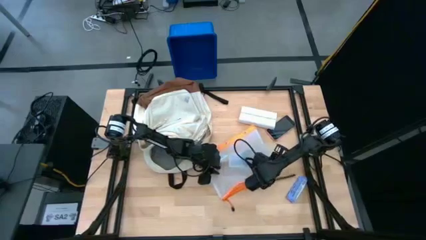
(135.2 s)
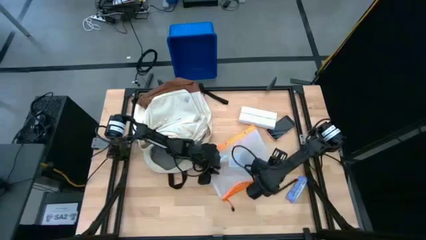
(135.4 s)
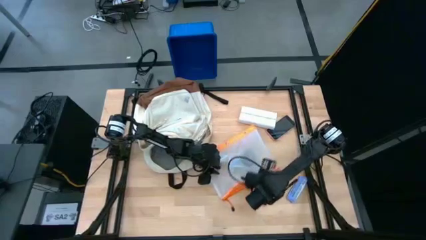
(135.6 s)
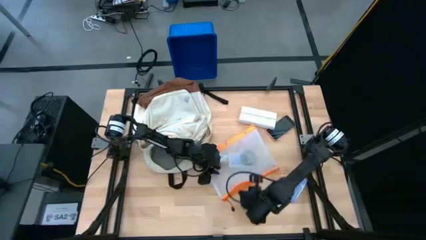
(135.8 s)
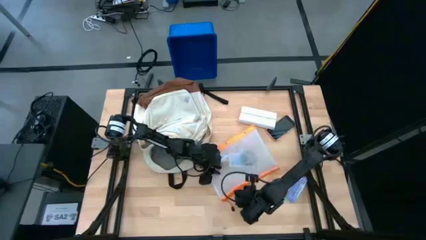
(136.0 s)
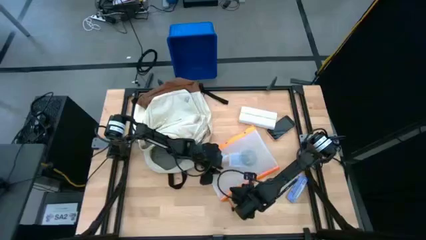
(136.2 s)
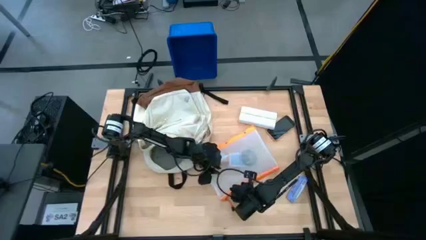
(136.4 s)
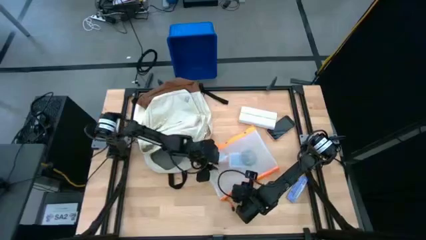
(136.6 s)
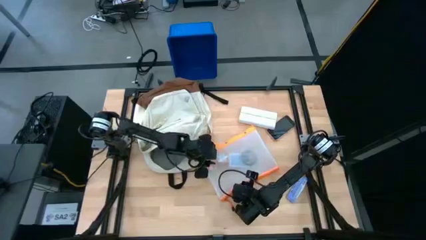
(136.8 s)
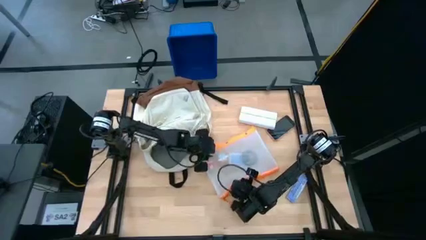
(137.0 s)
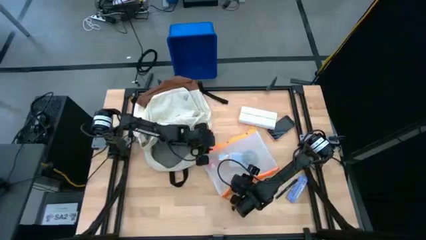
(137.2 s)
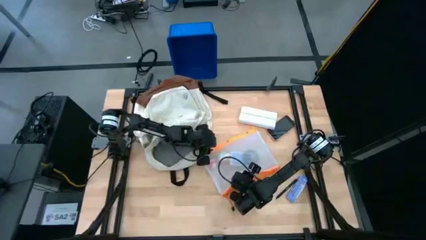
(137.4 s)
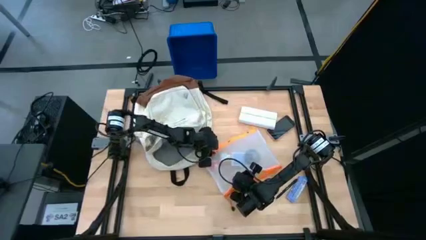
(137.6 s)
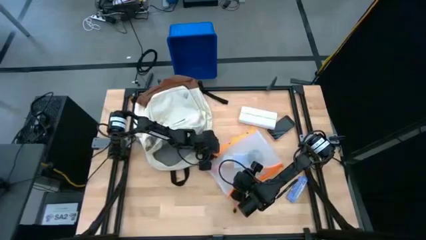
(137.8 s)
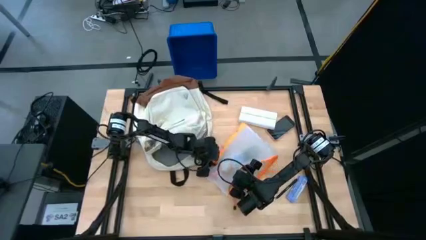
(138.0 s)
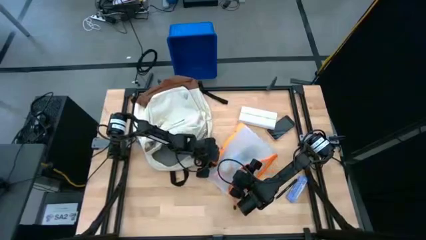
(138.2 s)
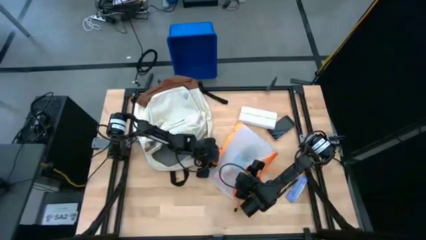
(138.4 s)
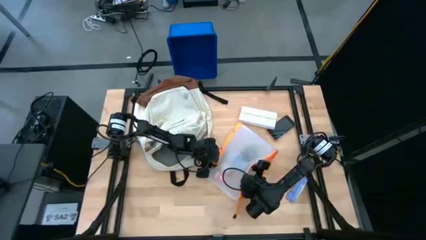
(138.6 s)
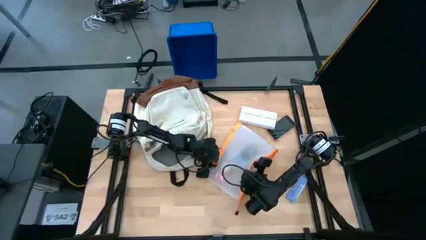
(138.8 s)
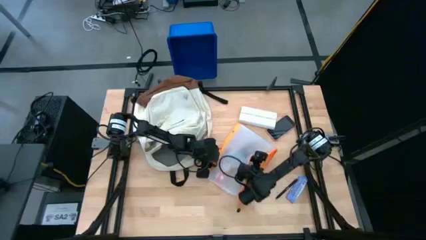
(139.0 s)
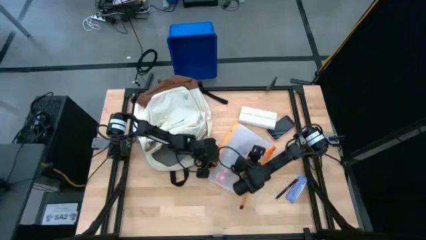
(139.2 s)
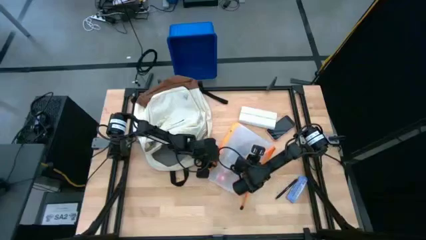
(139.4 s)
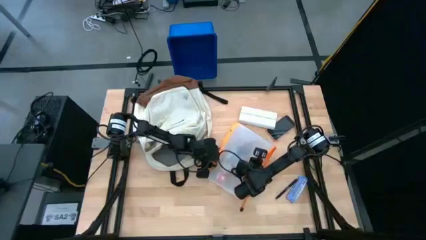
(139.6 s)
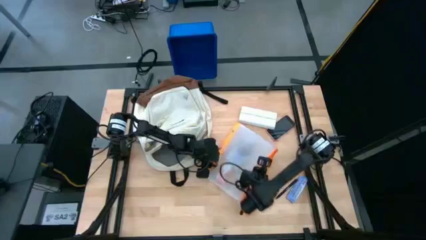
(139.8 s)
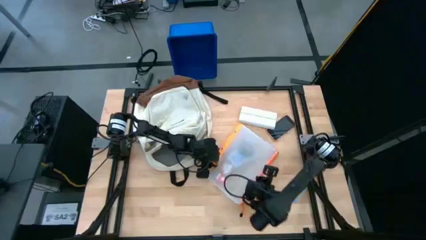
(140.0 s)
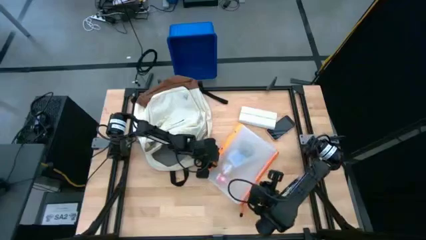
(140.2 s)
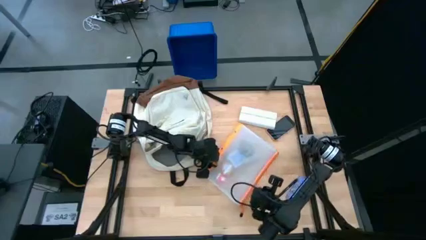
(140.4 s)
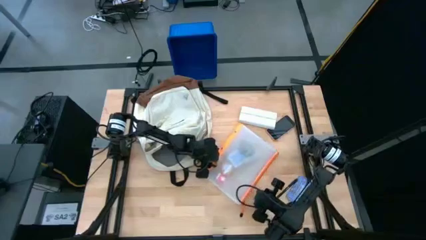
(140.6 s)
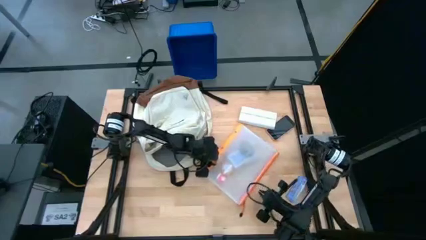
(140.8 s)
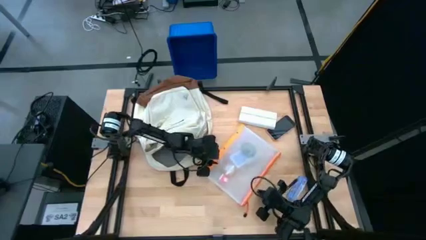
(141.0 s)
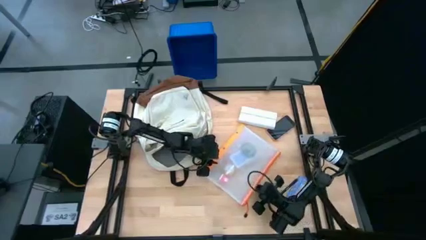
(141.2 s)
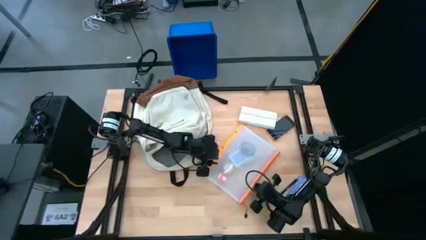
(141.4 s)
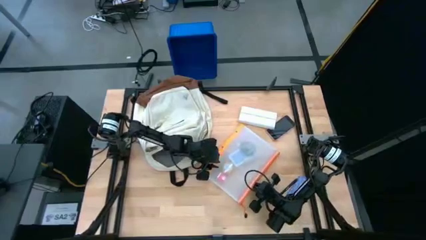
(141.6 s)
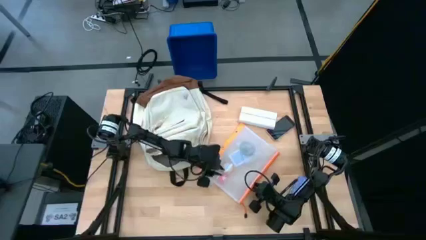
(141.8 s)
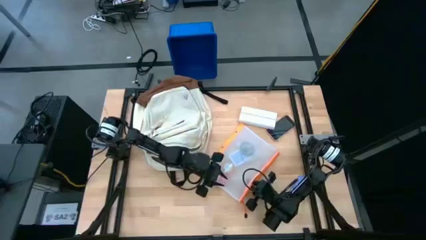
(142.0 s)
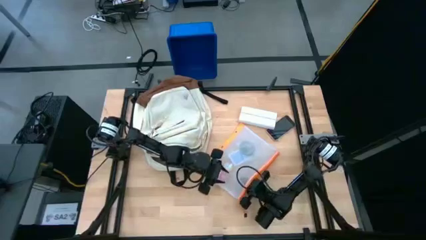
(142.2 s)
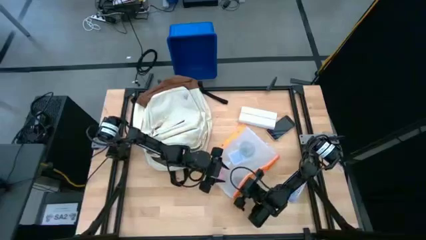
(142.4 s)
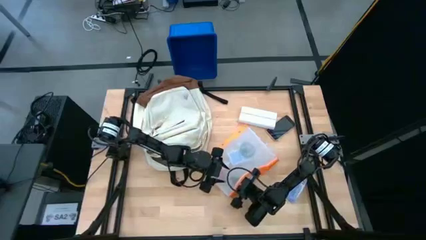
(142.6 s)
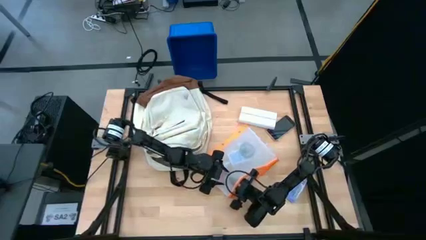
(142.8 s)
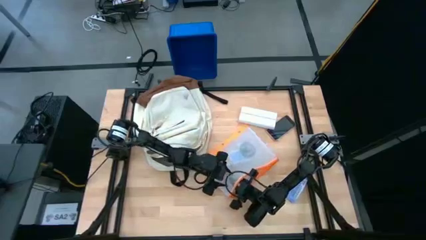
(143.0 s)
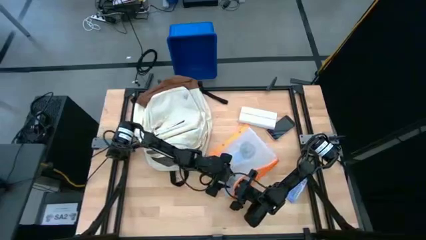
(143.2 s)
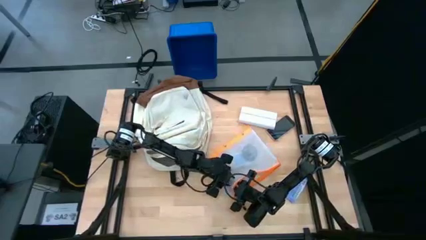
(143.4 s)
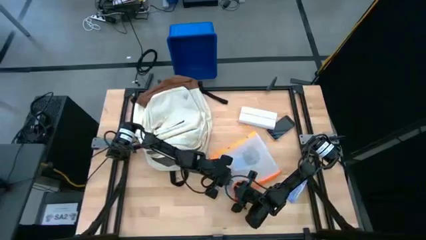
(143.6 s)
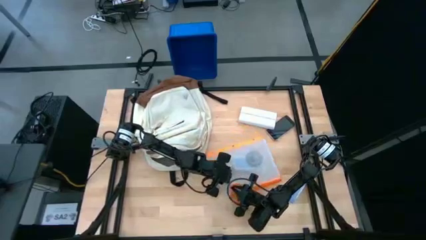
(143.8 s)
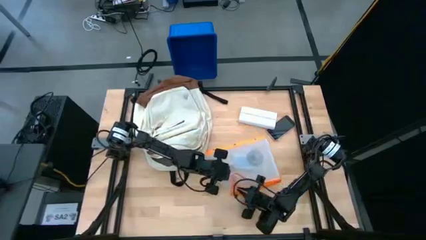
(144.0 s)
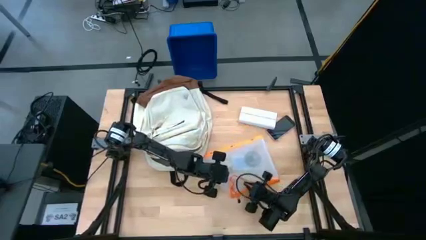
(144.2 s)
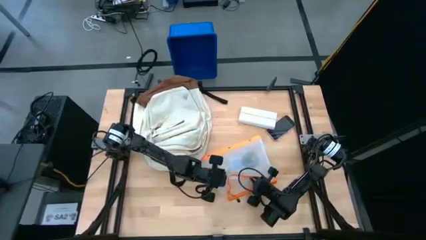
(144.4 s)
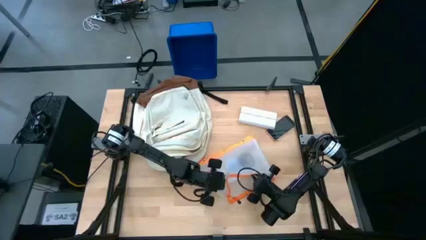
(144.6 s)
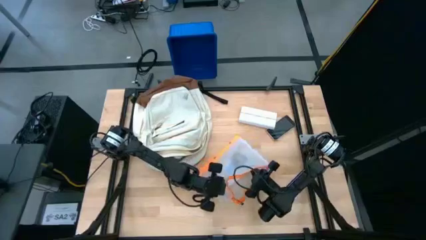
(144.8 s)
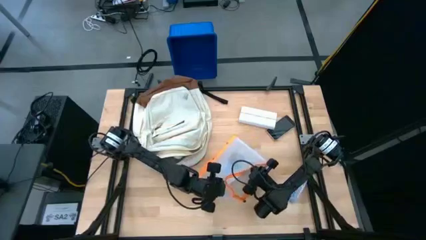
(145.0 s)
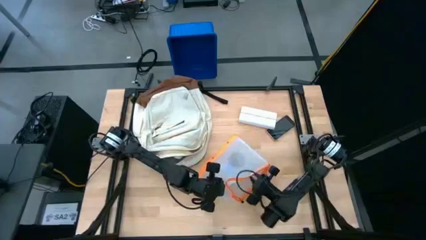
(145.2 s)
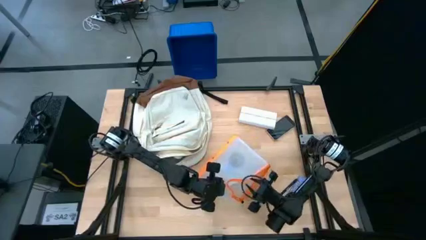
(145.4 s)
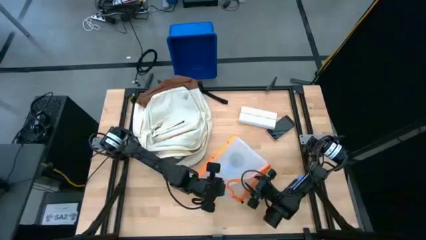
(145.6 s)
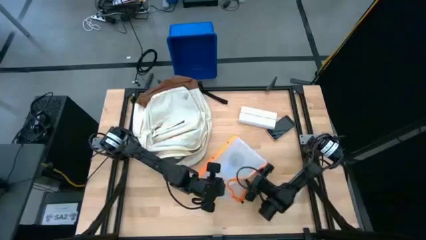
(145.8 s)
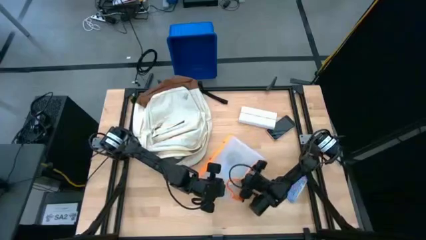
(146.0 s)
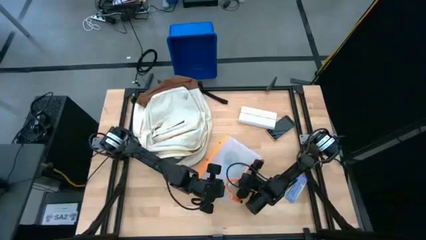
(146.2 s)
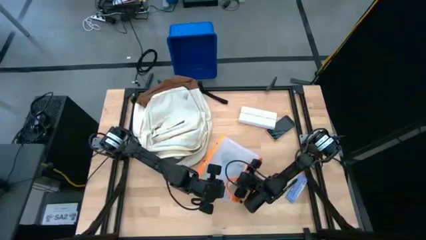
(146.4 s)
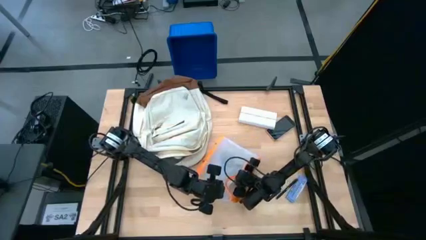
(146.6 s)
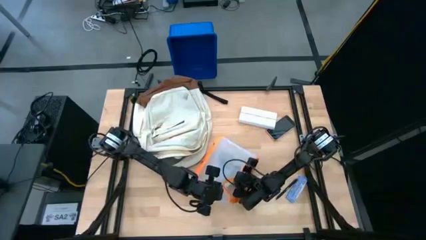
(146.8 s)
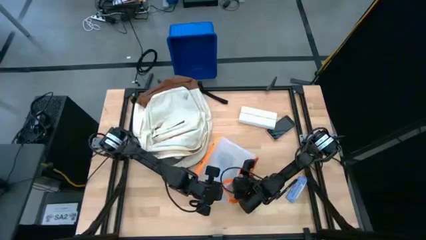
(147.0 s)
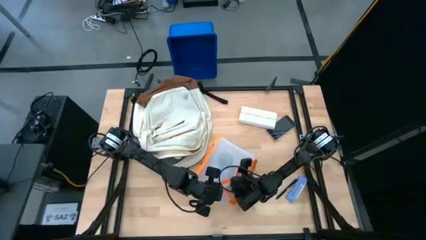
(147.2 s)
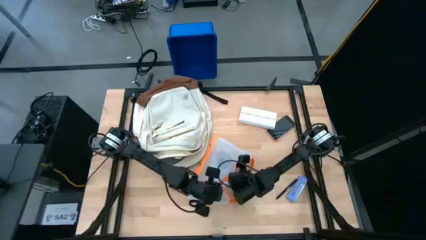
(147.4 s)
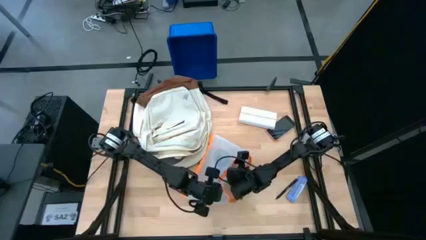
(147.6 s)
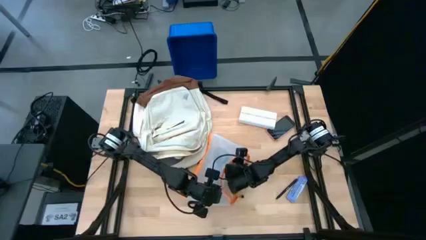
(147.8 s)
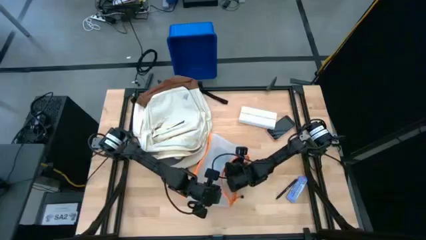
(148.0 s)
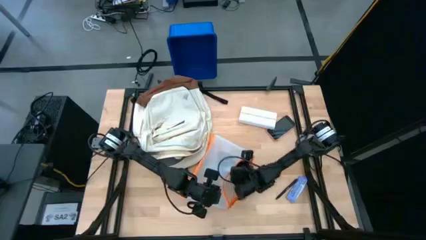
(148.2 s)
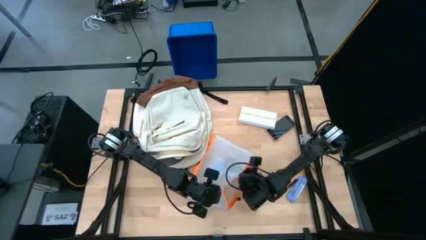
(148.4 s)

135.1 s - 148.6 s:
Task: Unpack backpack
Remove the black earphone from the zip bag

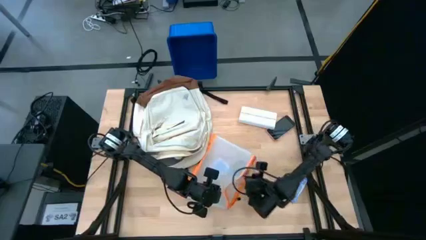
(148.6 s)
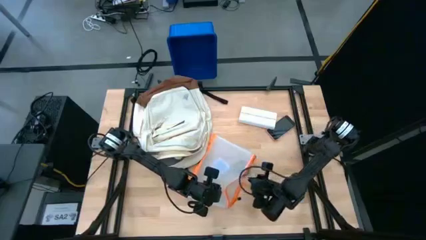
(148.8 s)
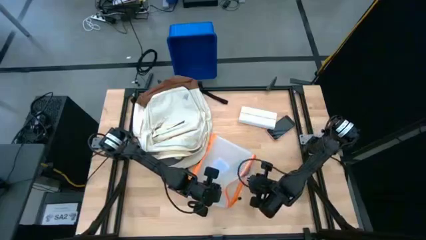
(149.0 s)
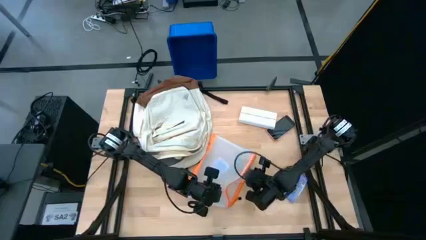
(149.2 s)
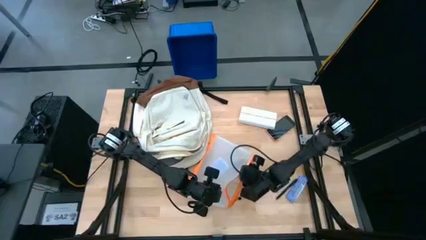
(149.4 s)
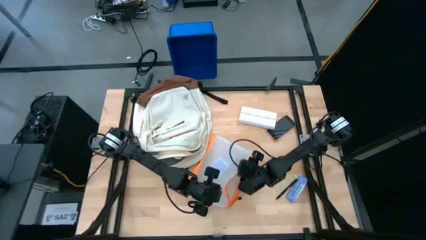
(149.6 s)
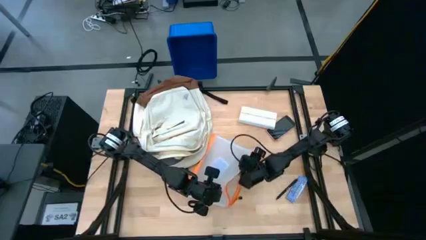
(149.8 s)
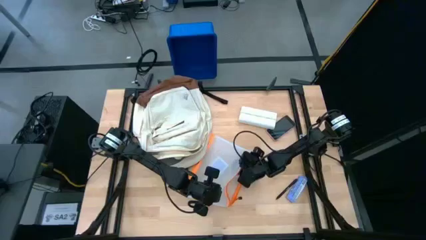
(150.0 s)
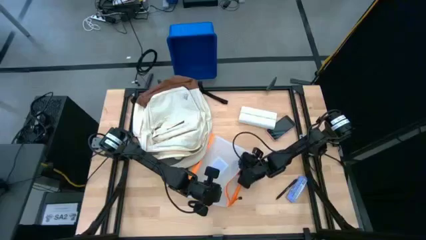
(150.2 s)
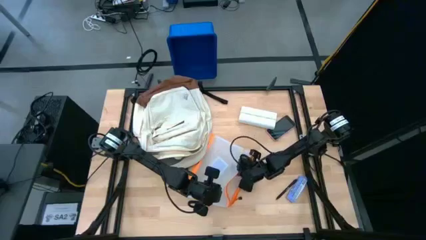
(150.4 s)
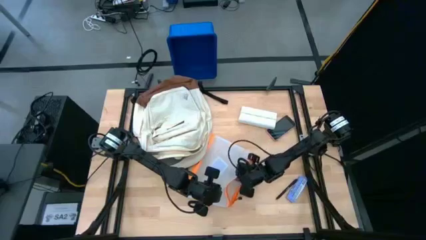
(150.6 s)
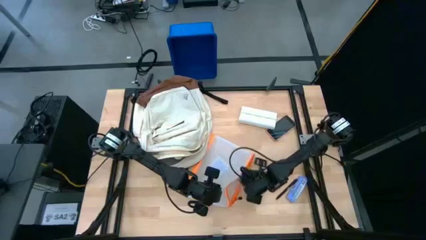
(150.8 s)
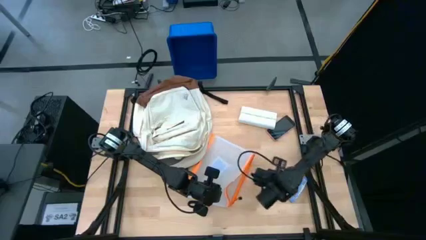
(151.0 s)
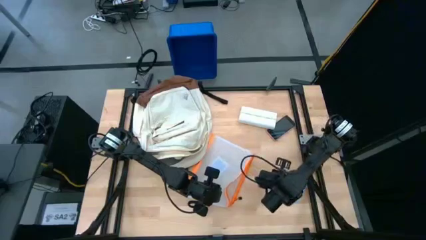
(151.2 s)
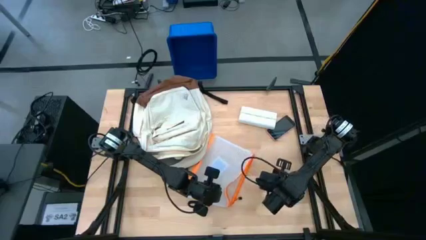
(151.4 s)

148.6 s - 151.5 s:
Remove the black earphone from the zip bag
